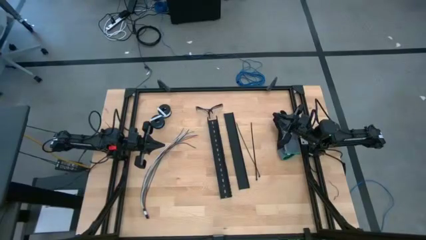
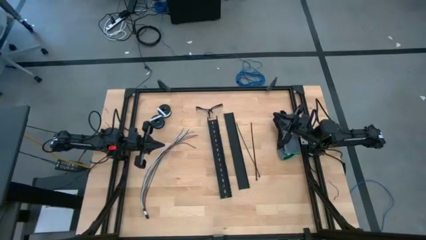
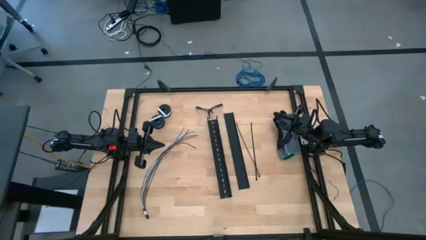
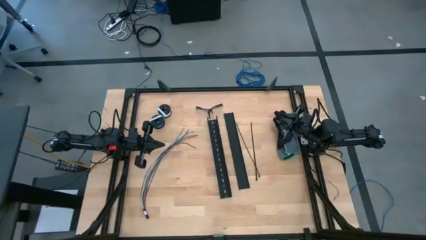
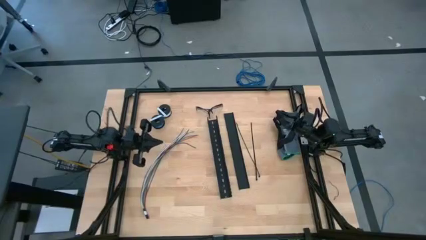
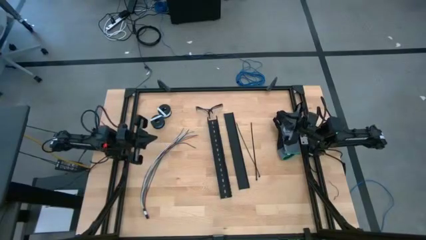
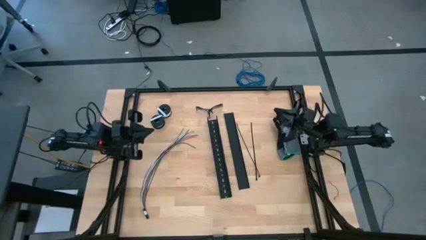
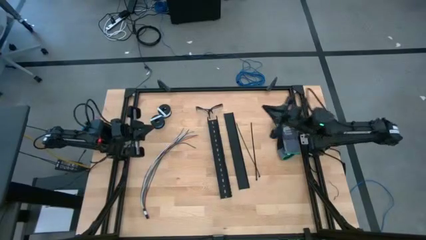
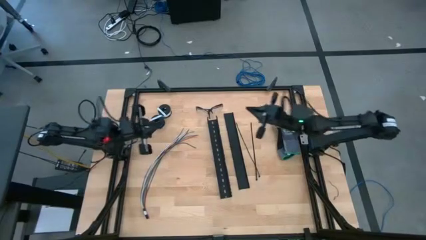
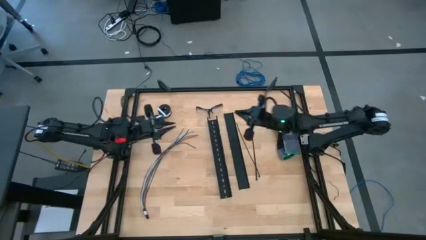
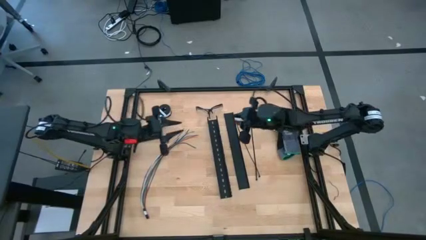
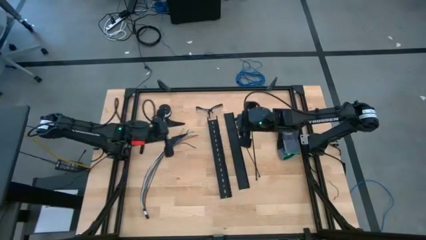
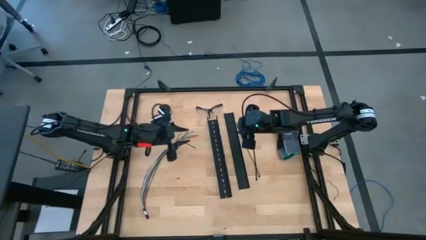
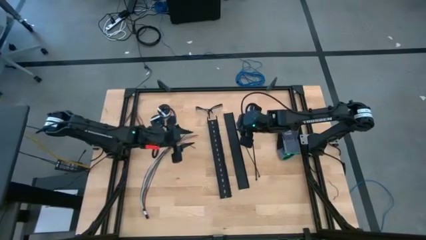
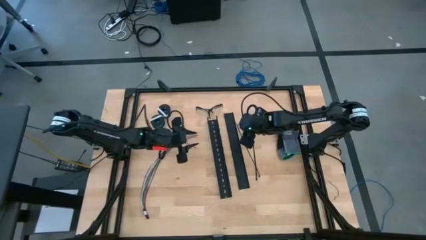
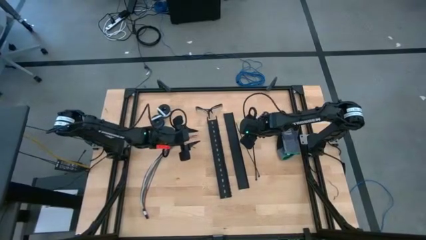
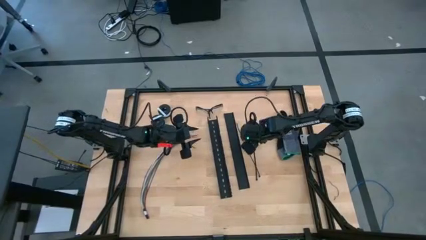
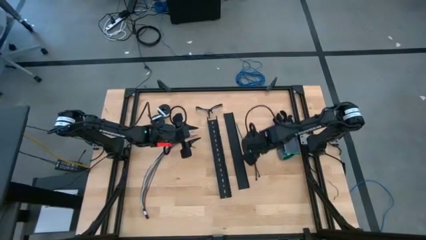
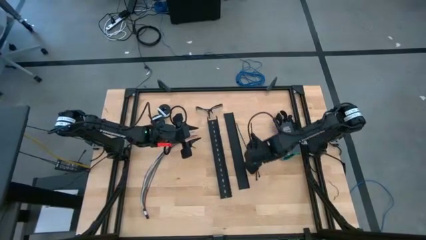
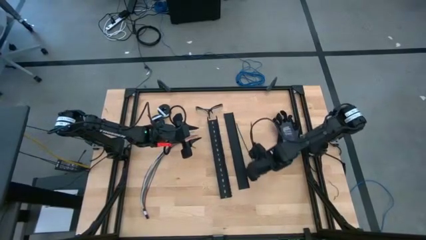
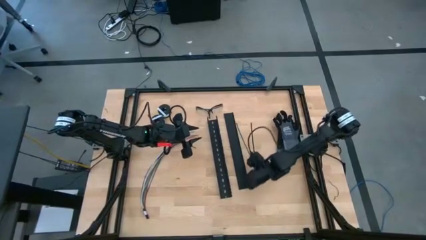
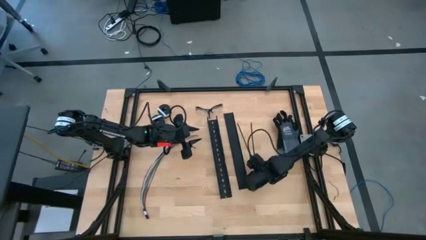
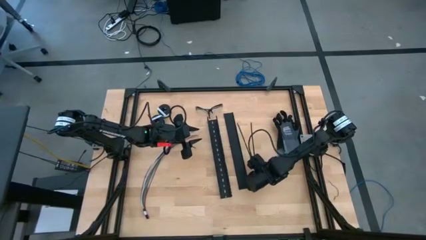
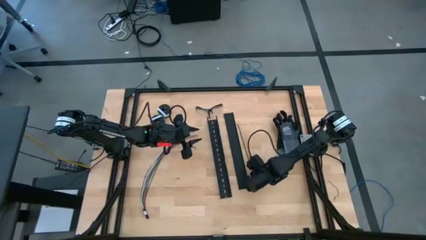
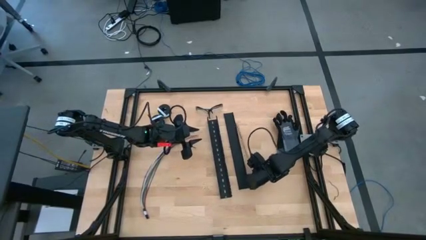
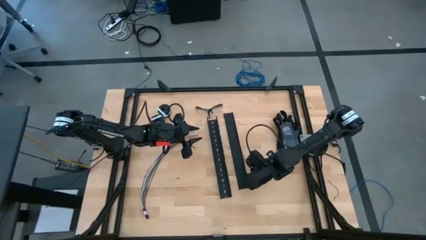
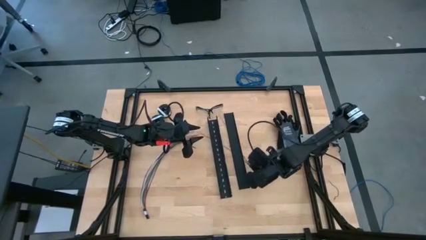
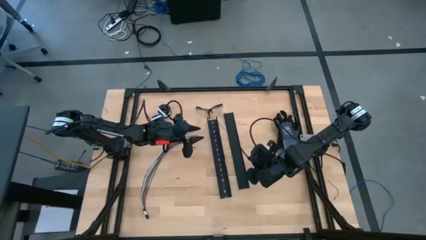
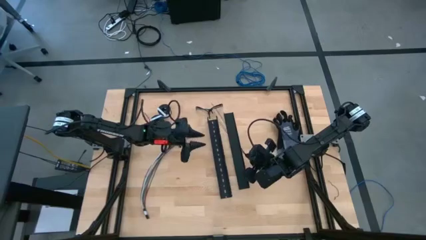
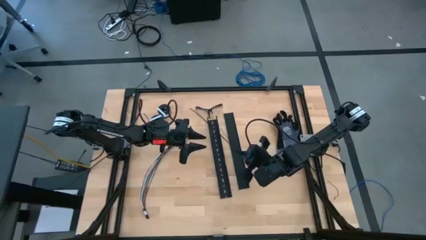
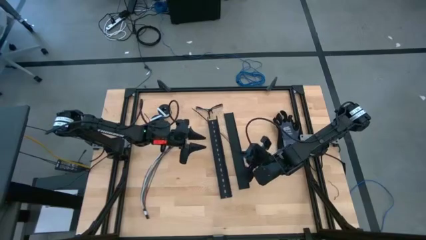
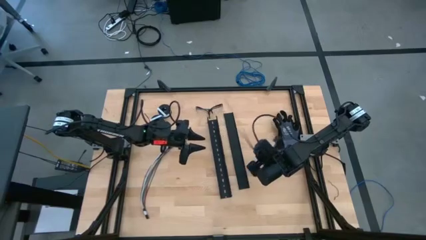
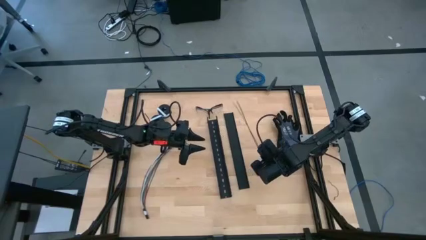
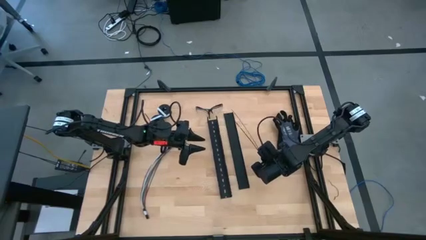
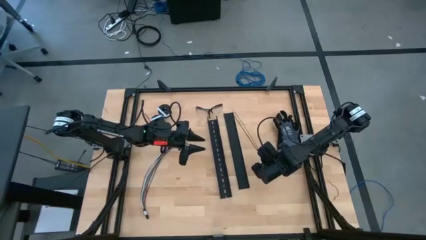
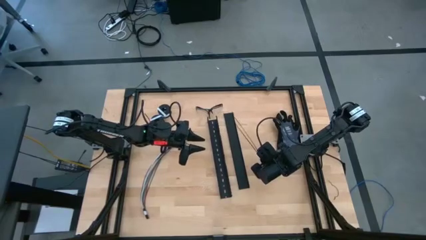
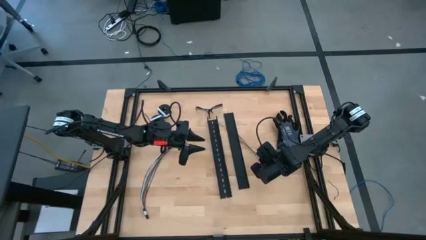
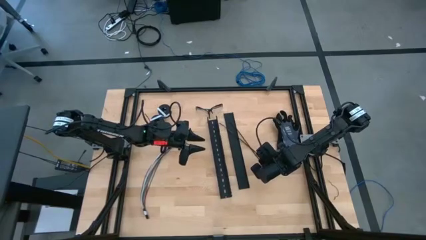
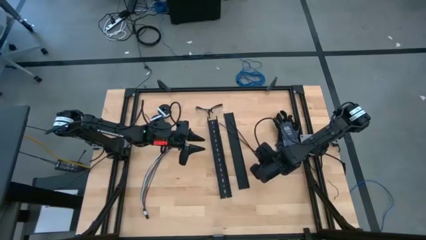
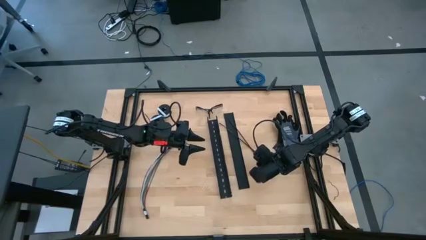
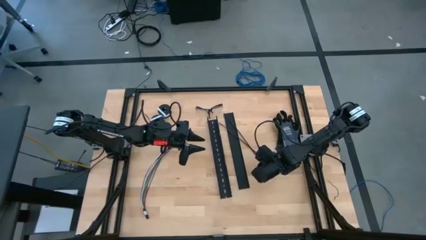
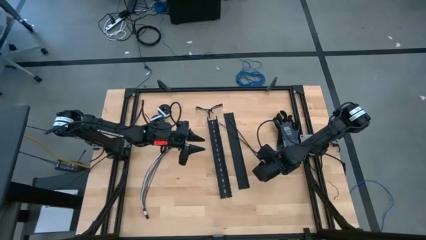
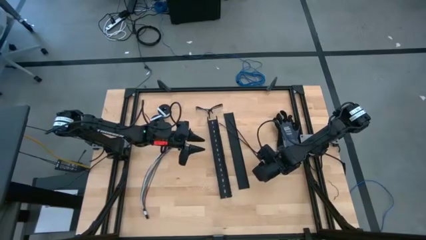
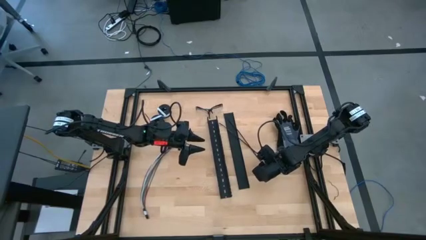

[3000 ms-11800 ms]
Task: Ziptie cables
Wrap the black zip tie on the cable

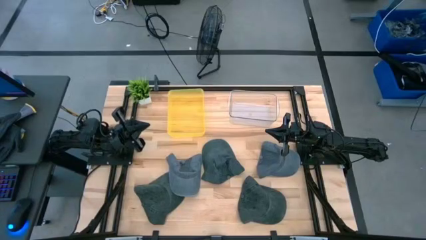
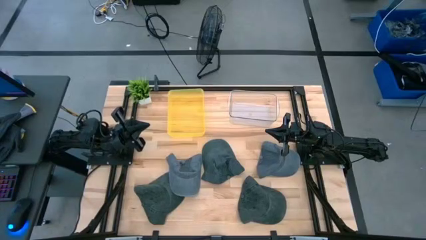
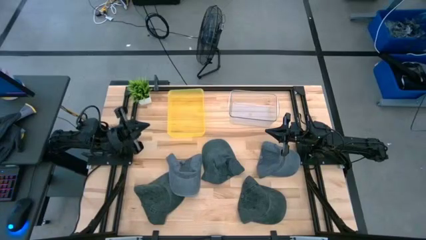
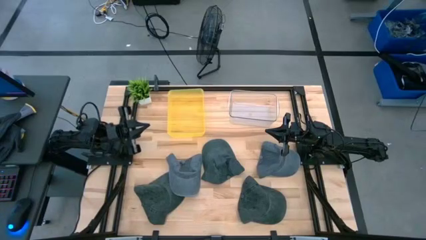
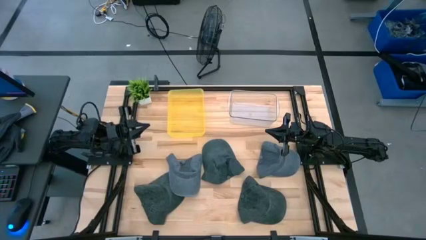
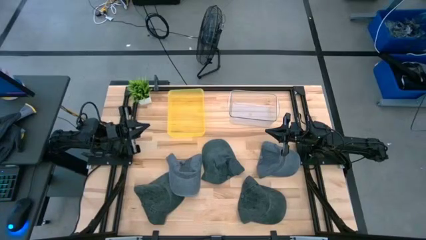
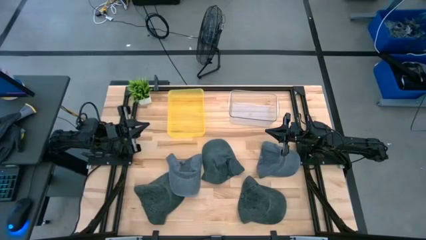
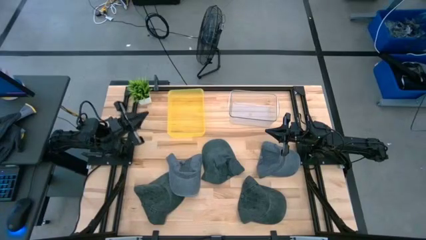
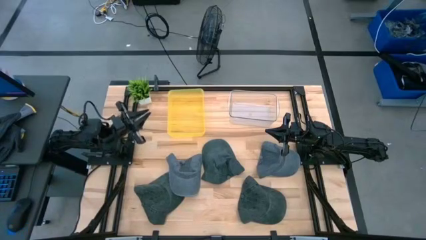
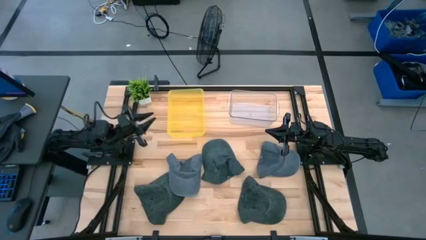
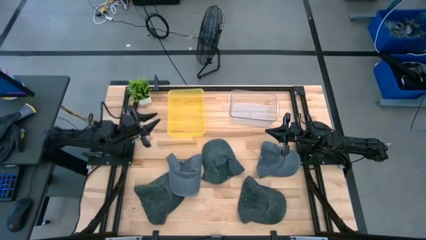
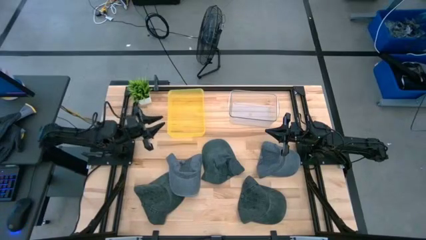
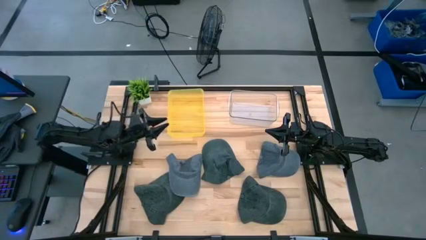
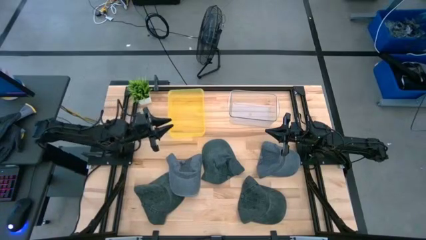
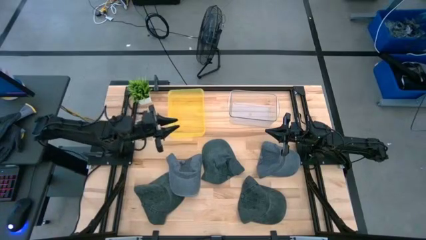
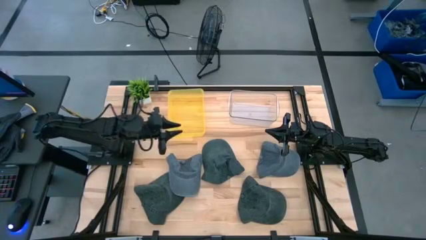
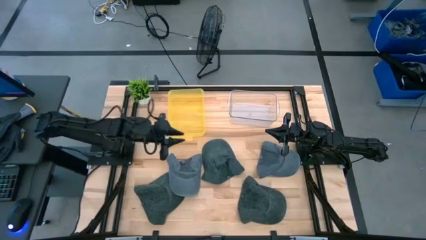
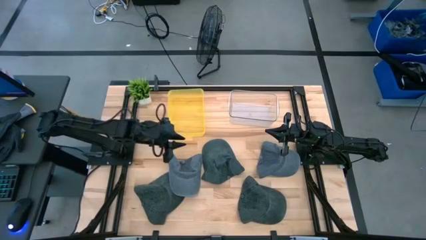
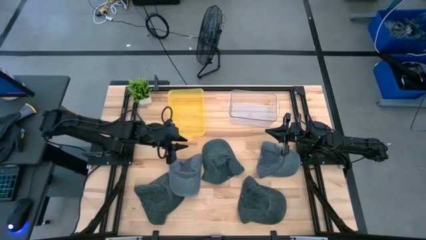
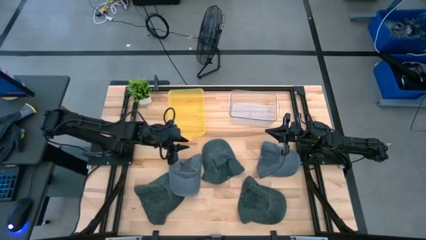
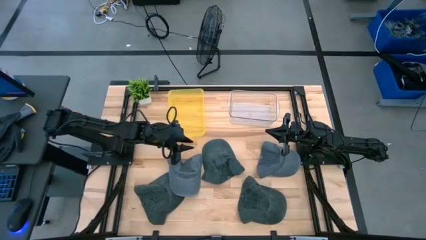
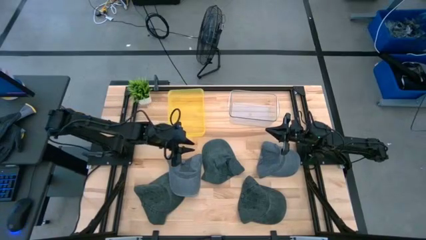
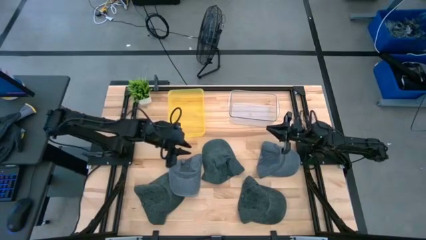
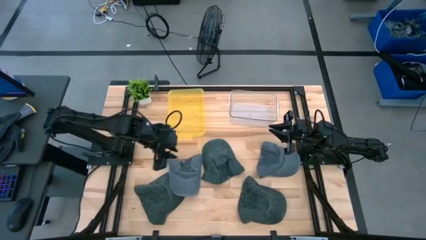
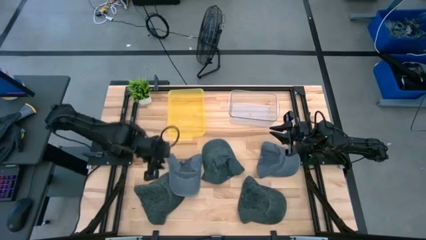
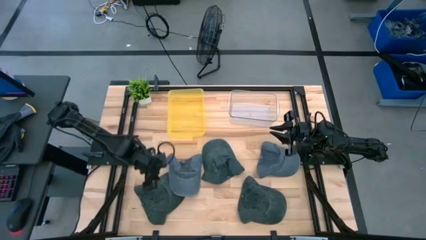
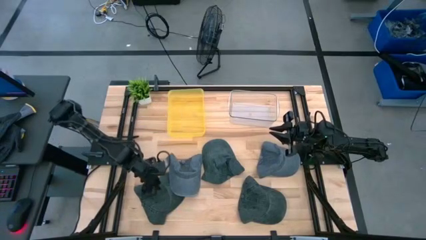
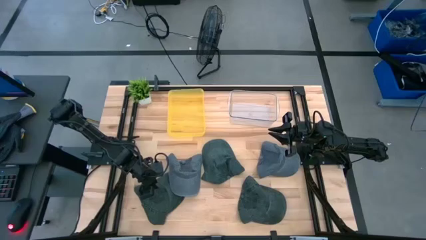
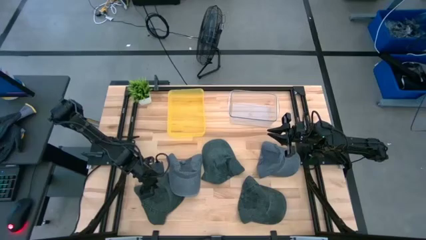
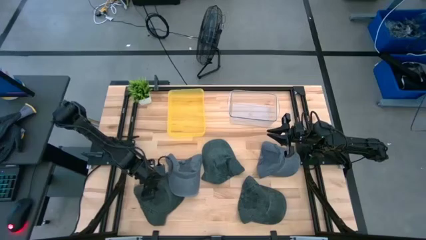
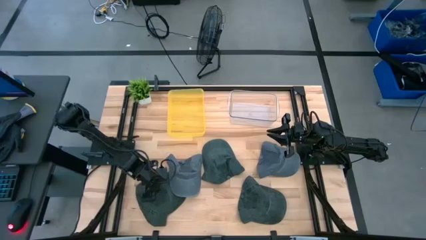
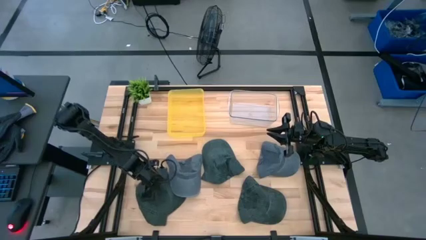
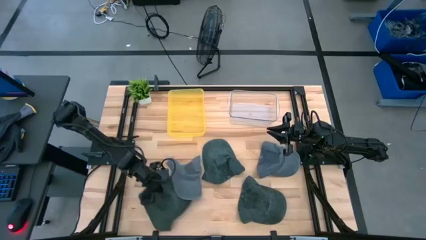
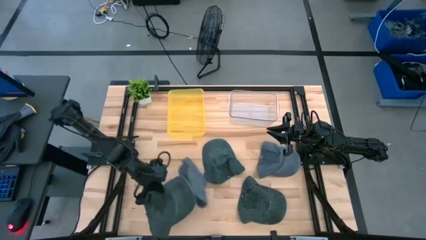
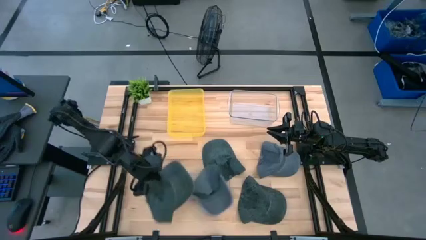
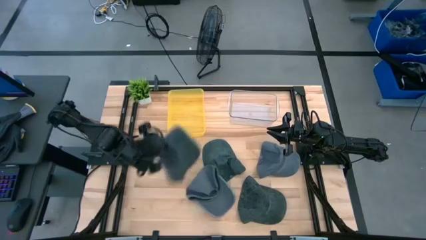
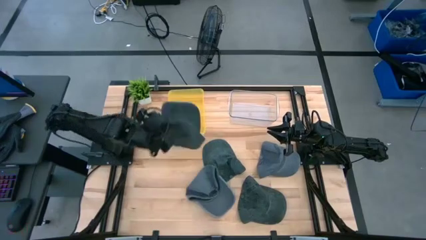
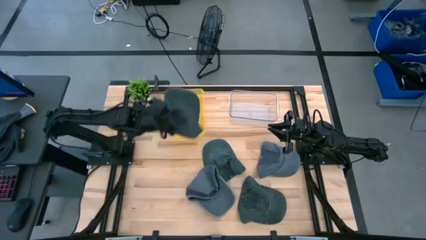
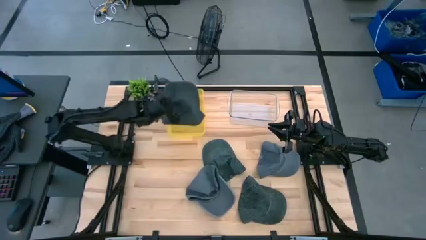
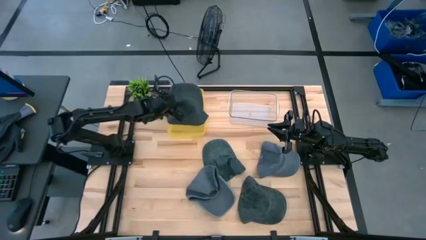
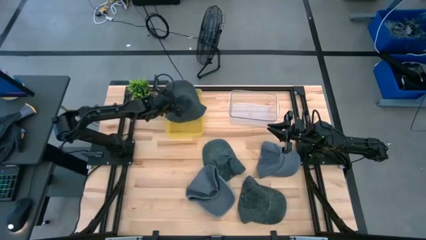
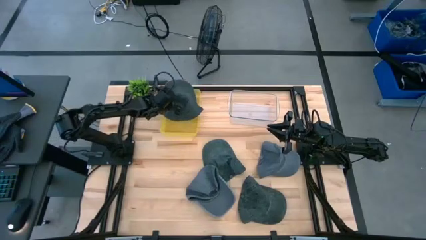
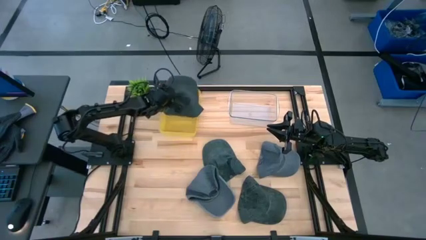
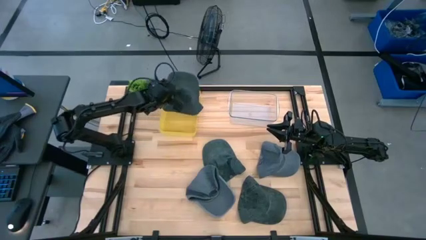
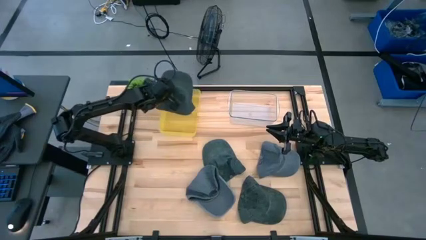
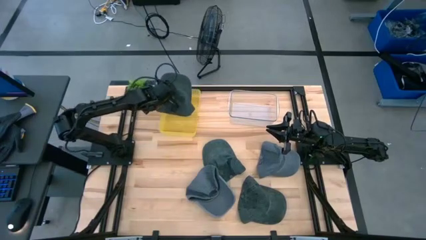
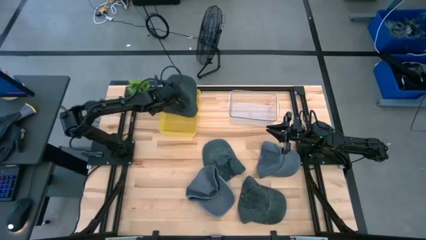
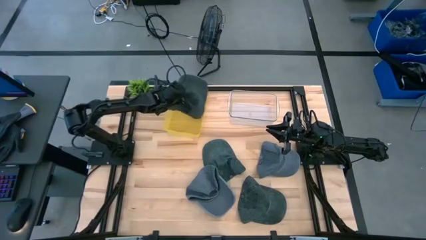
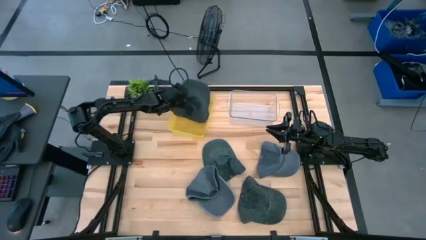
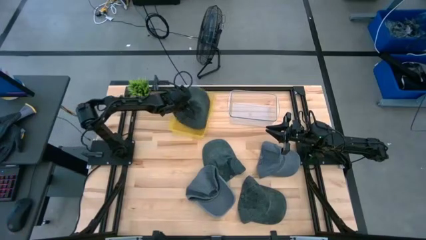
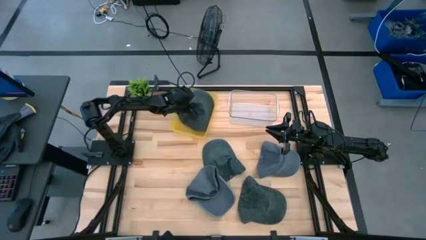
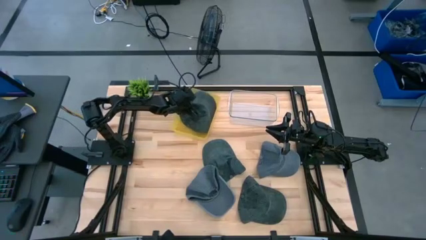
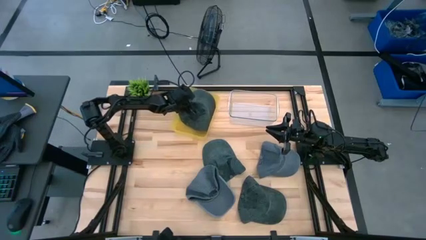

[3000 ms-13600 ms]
Task: Pick & Place hat
Put the left gray cap into the yellow bin
